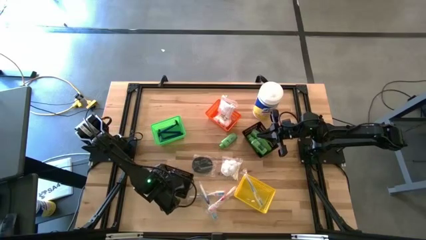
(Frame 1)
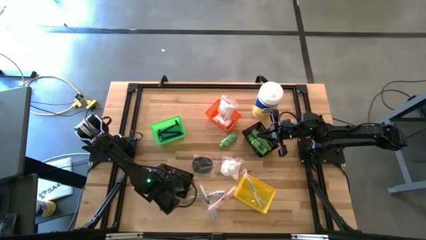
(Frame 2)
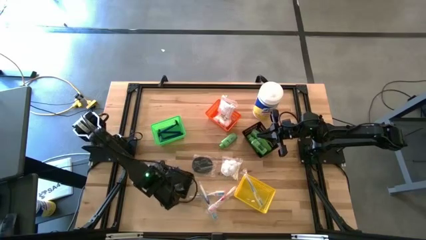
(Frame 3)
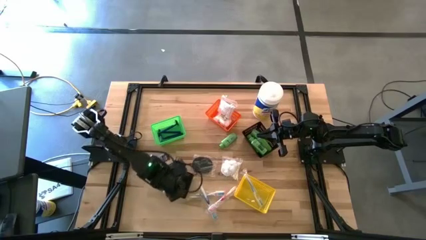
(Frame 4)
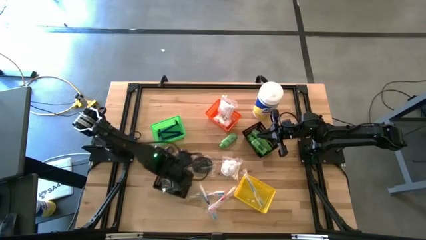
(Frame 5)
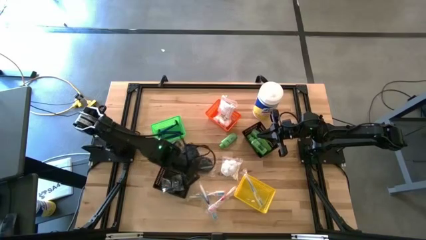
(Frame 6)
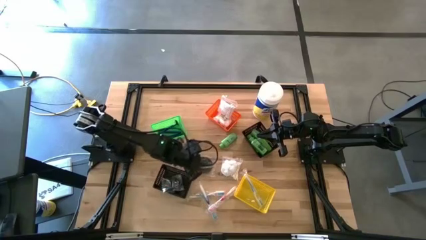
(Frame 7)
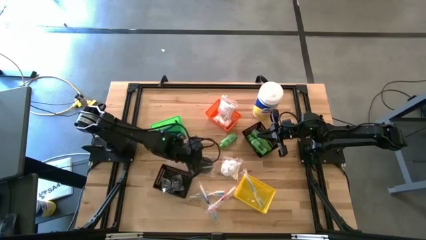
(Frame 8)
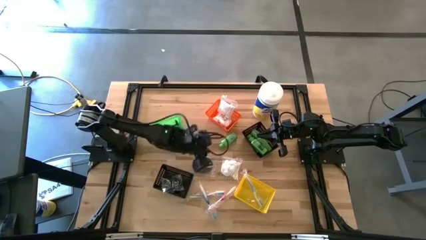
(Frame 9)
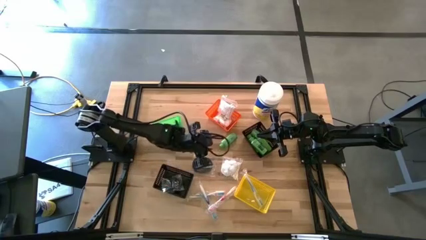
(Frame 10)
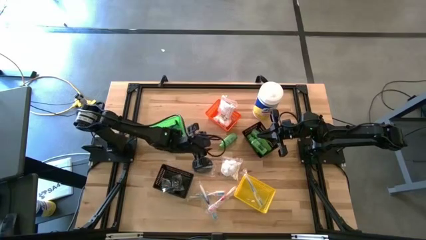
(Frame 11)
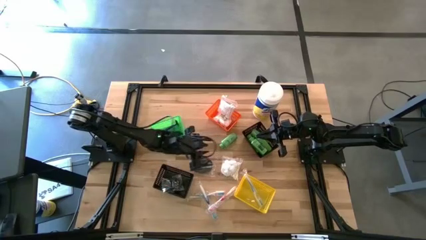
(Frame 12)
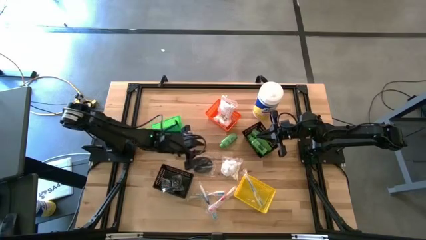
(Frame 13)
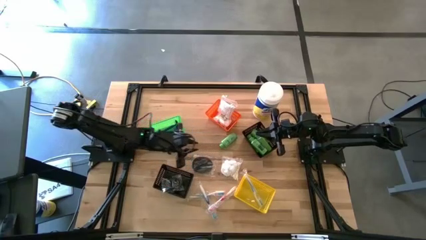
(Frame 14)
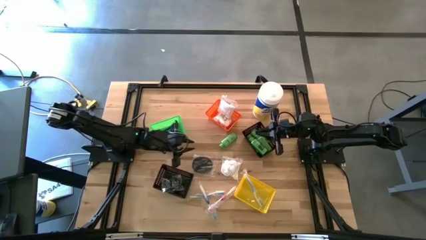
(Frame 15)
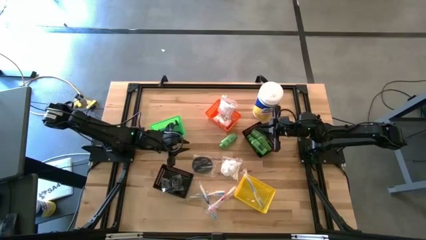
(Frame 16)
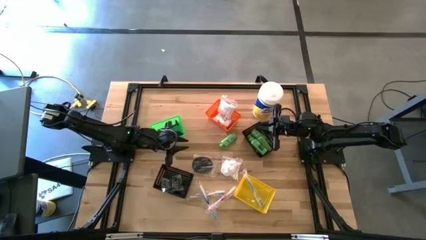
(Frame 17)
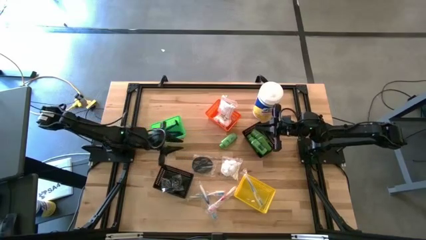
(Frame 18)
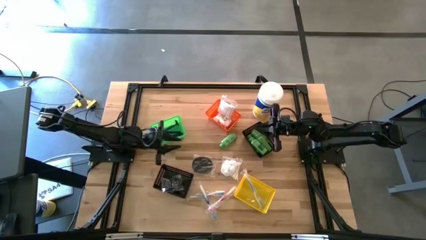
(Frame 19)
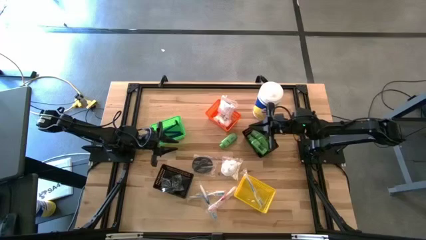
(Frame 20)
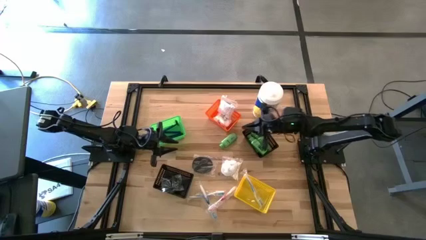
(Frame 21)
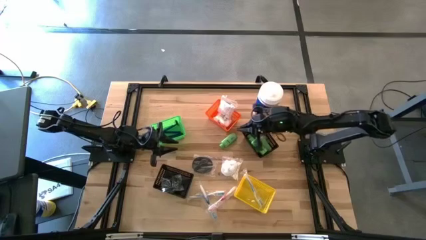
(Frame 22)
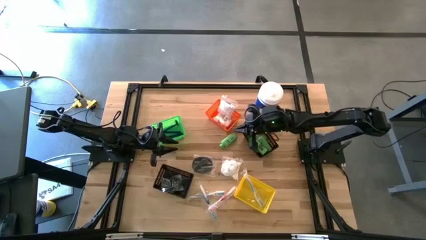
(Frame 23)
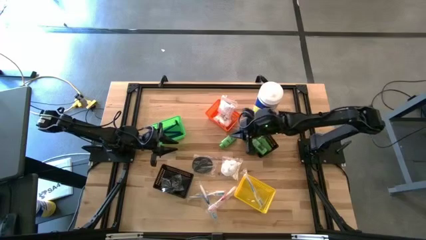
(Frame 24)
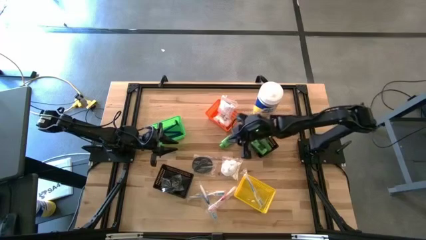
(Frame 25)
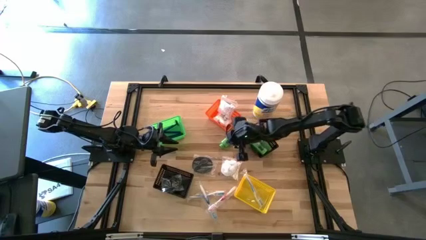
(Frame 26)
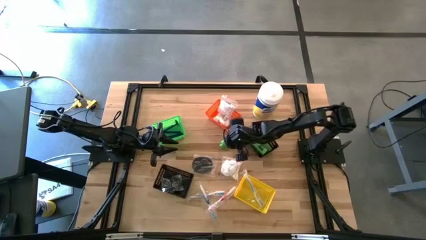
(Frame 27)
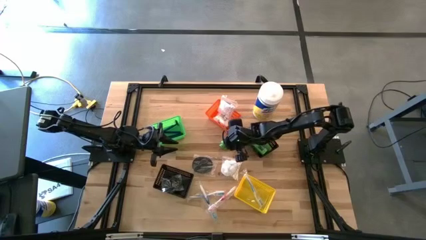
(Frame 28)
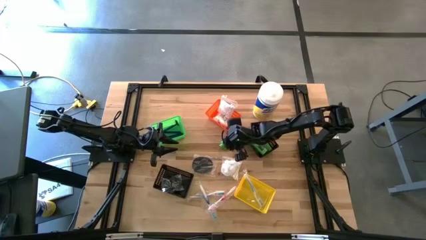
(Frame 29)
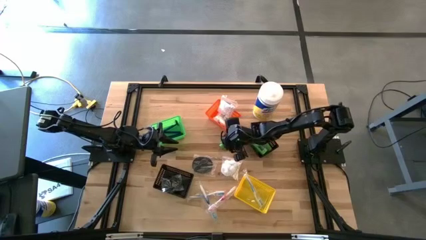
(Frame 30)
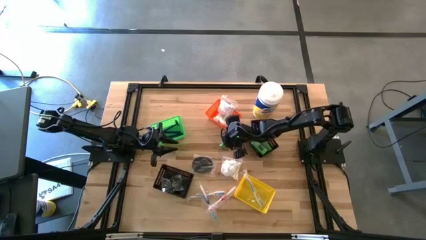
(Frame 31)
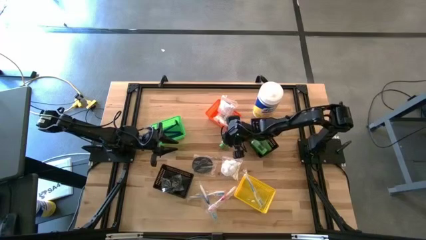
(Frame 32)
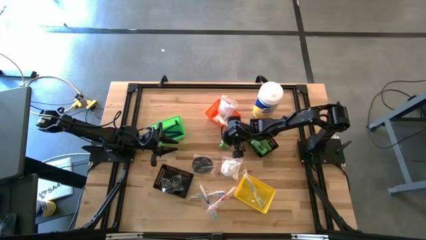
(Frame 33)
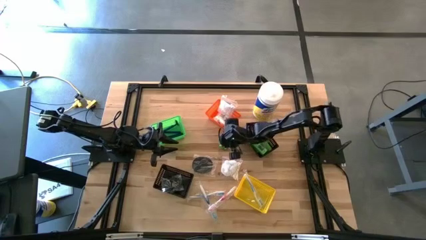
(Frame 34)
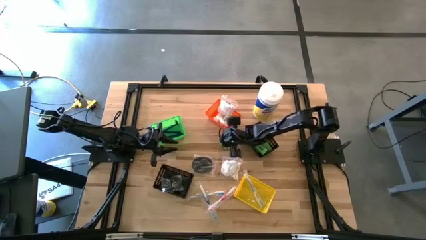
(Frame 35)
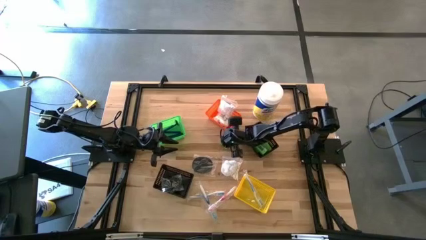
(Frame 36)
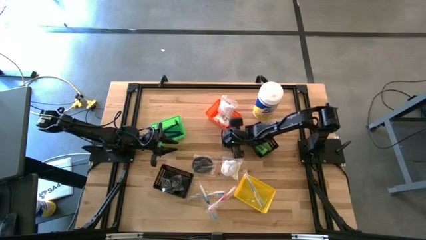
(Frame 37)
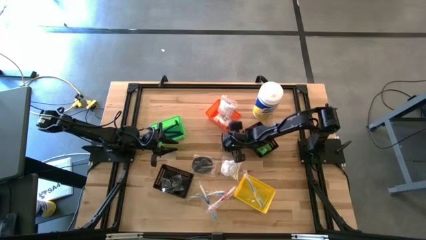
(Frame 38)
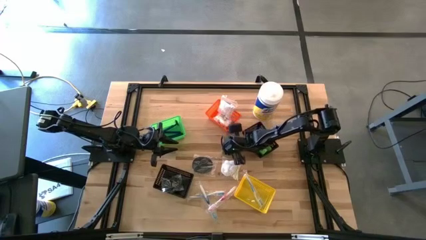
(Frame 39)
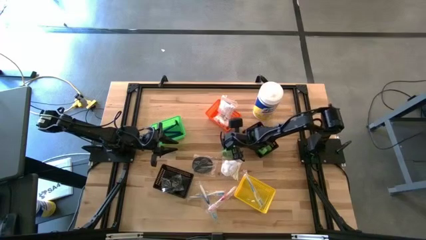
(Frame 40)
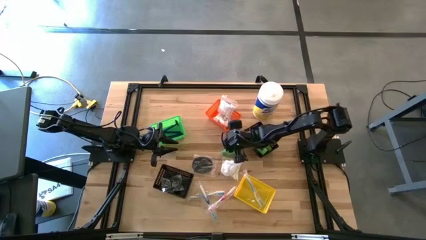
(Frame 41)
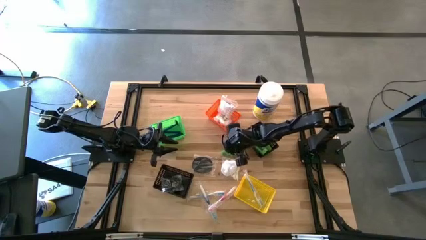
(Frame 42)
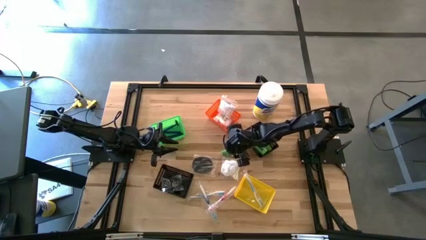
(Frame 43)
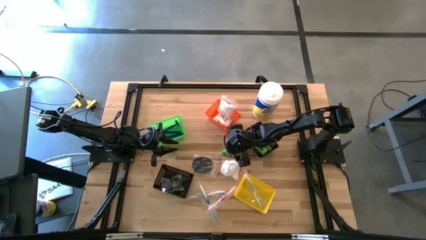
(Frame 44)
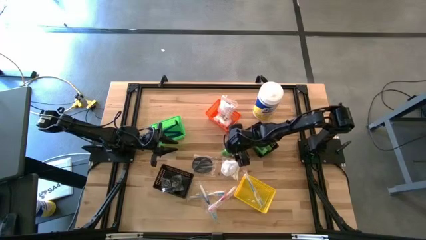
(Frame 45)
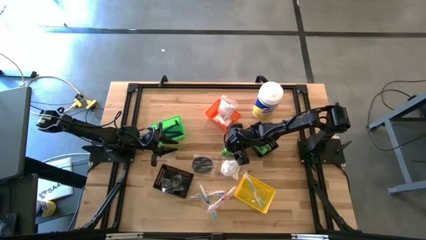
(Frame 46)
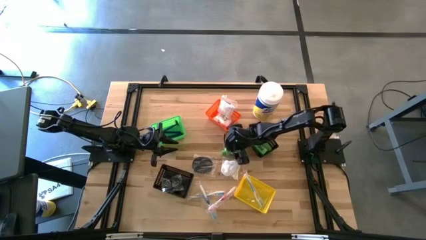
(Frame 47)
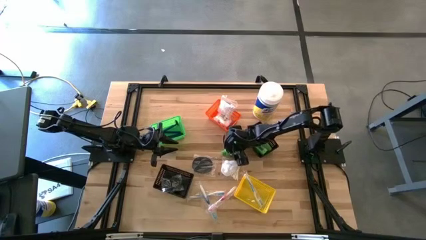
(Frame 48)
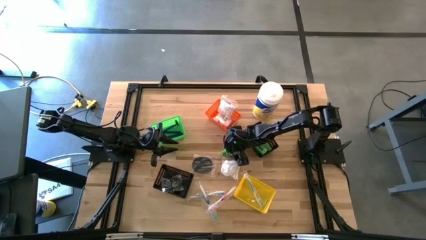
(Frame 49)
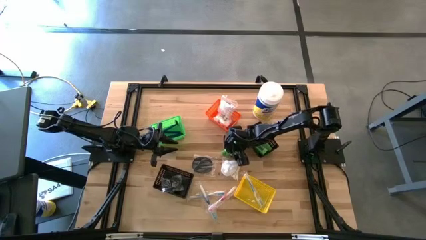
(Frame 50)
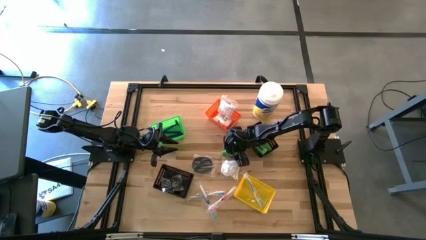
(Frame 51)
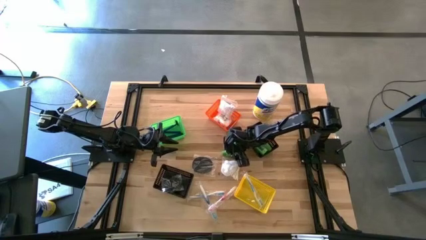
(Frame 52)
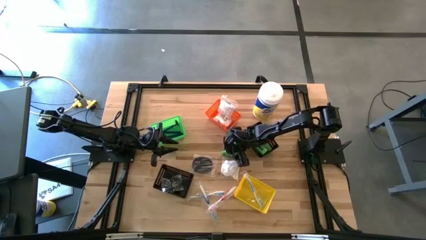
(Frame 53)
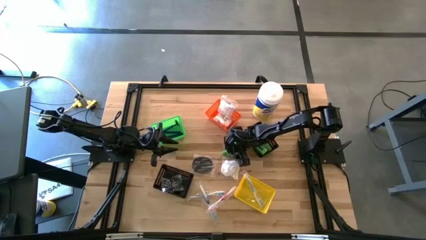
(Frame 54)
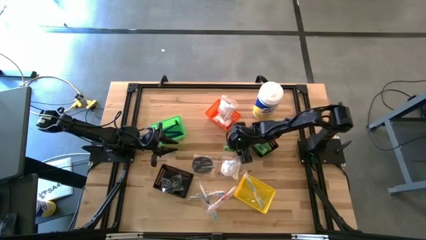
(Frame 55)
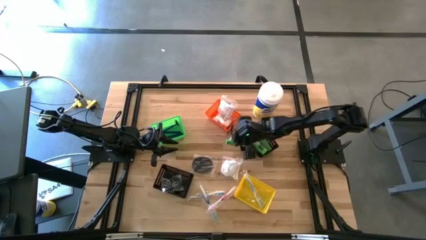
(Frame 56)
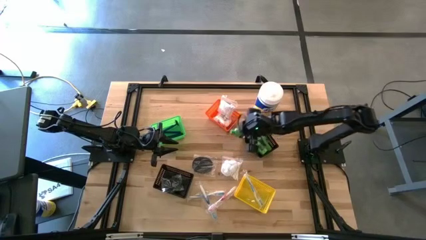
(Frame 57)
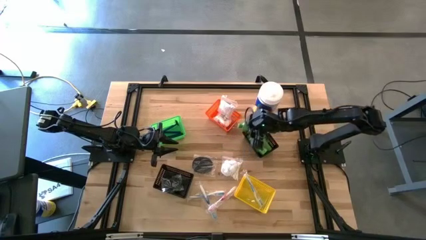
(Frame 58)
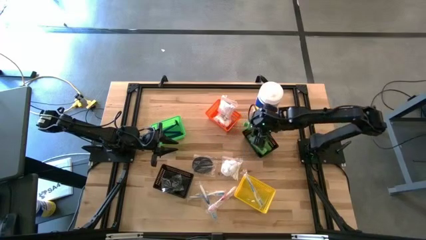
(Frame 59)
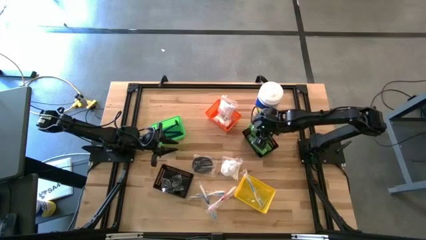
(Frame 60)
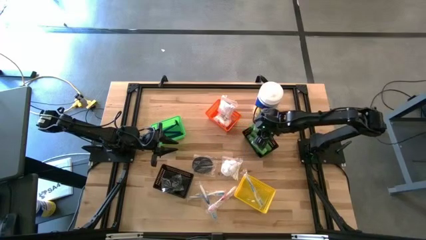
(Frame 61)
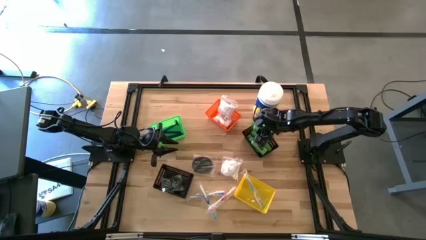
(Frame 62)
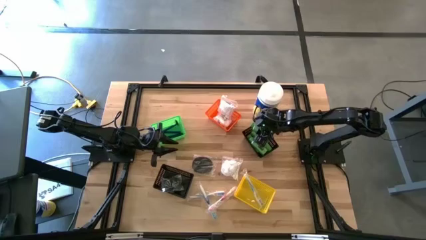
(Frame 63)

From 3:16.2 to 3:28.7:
Task: Pick & Place Travel size toiletries
Put the green shampoo into the top black bin
